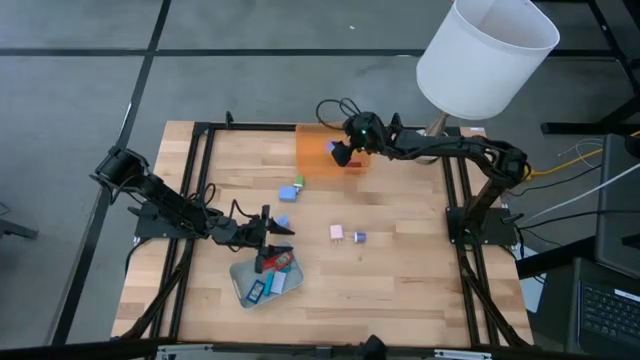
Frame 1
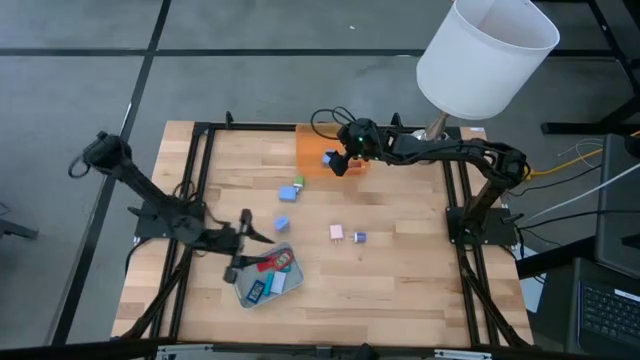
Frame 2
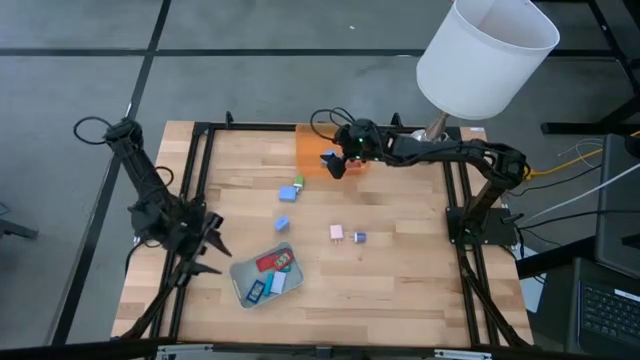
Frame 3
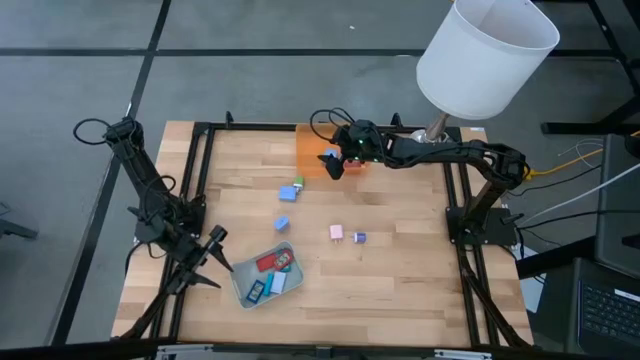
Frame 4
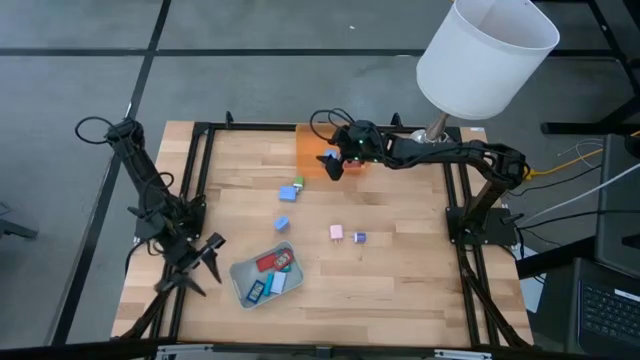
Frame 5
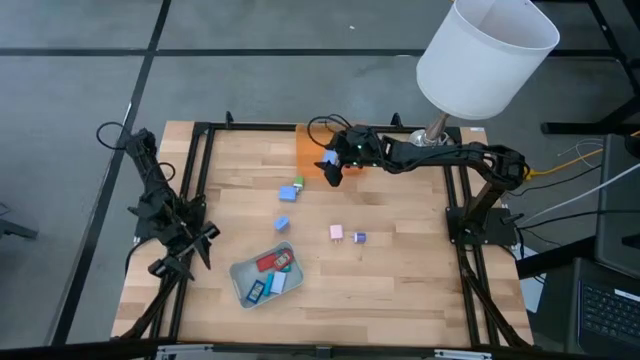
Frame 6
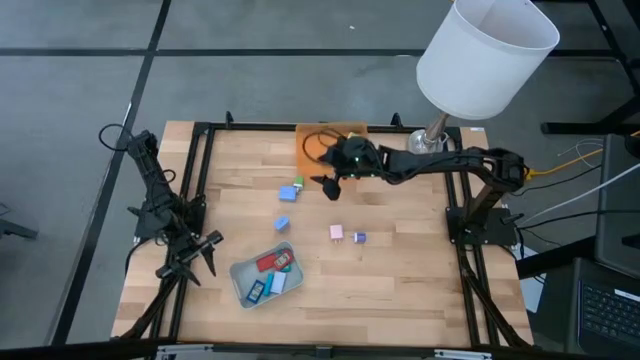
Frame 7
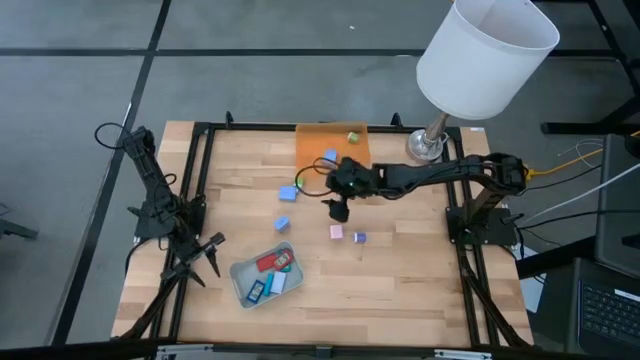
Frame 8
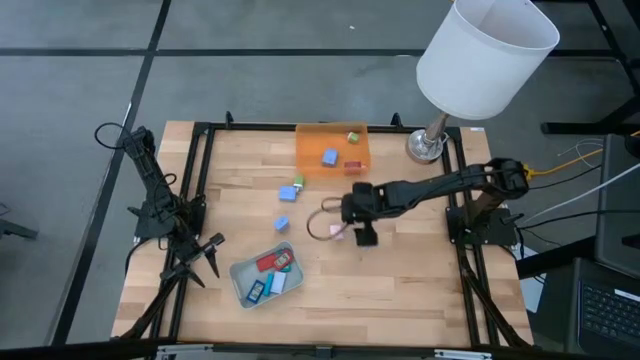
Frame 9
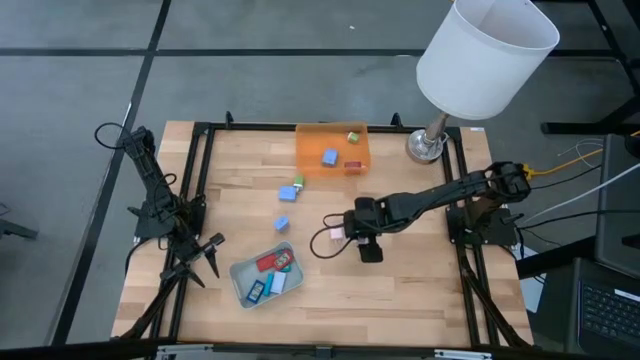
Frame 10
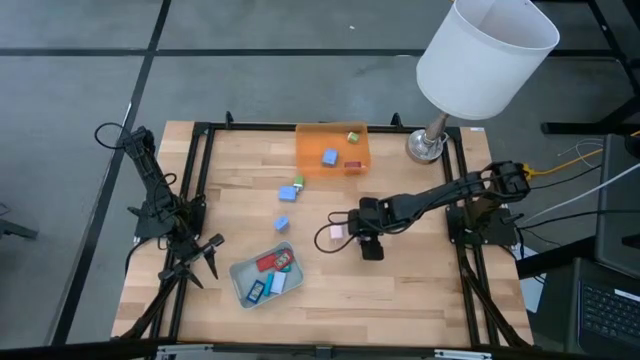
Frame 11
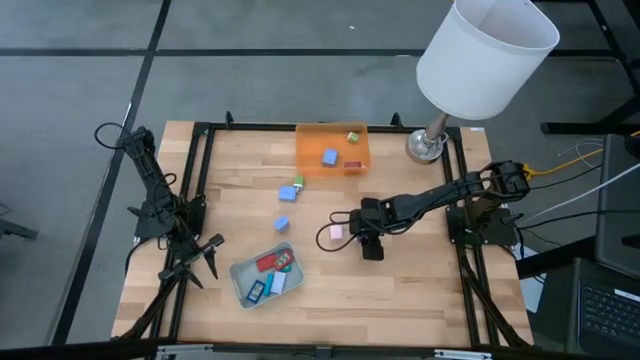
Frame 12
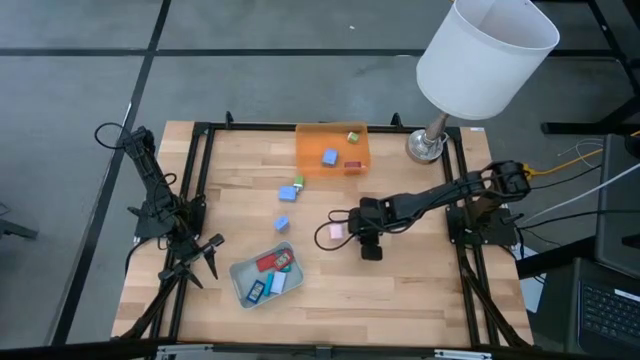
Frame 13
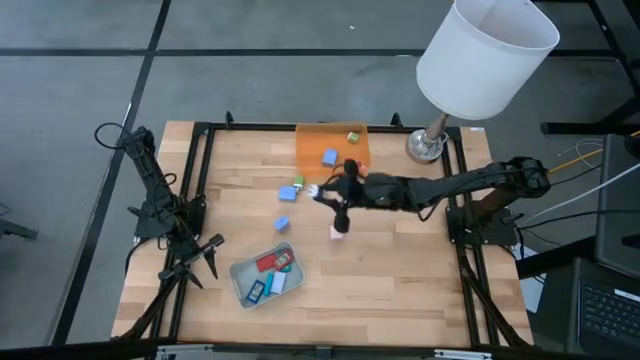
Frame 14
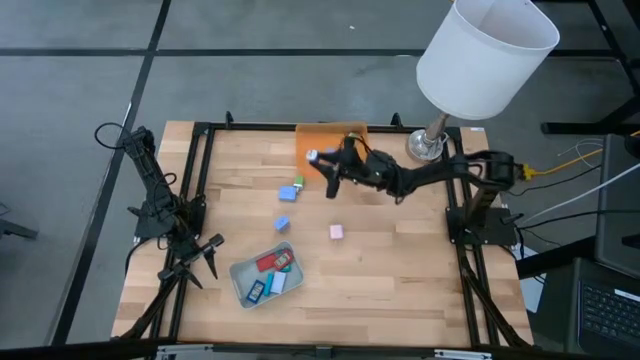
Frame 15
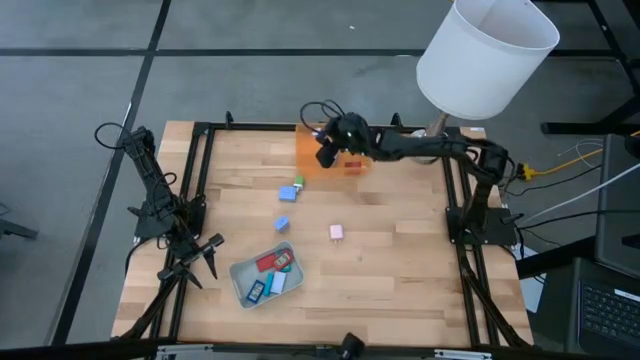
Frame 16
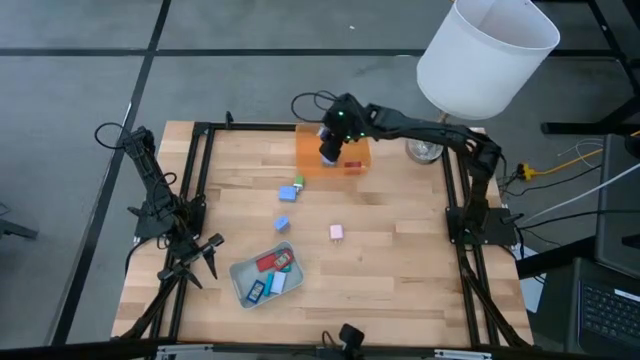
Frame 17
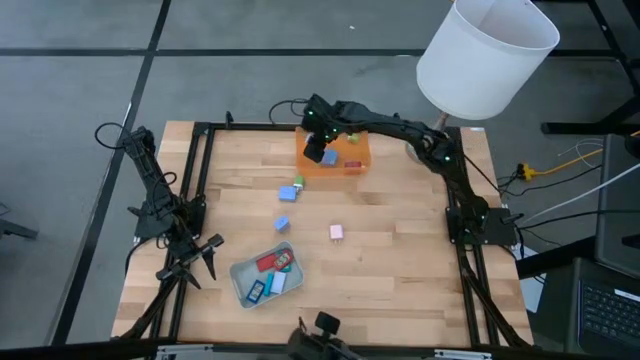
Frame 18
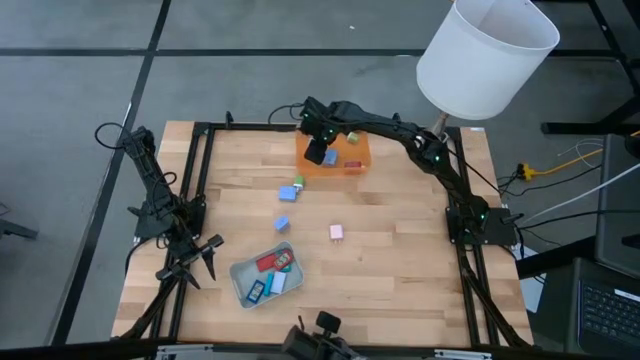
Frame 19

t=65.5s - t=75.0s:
Task: Pick & Place Office items
Put the purple charger adapter into the orange bin

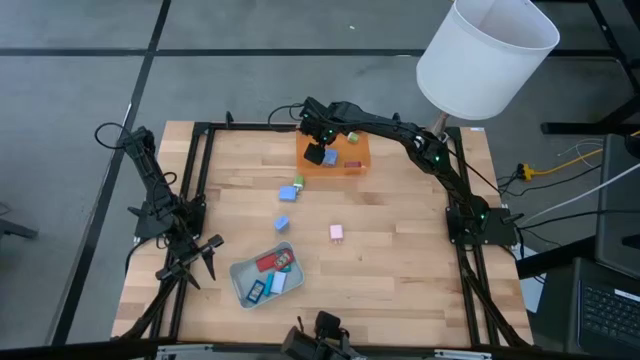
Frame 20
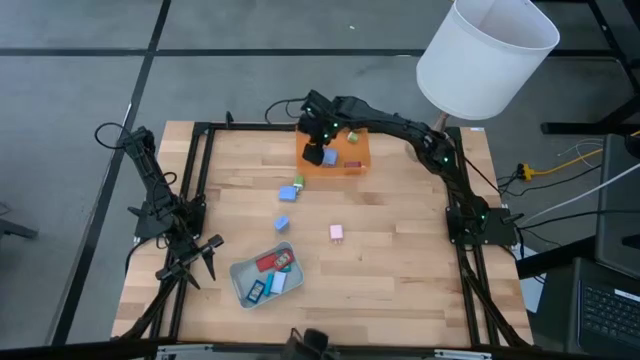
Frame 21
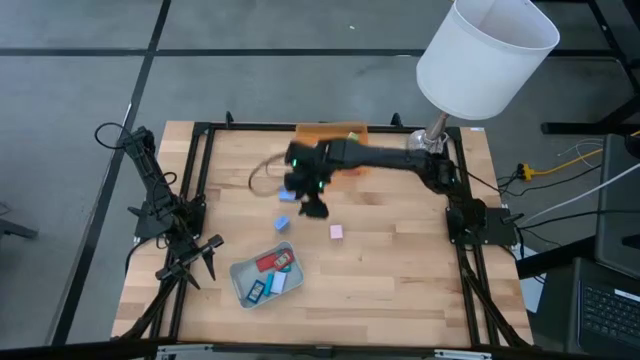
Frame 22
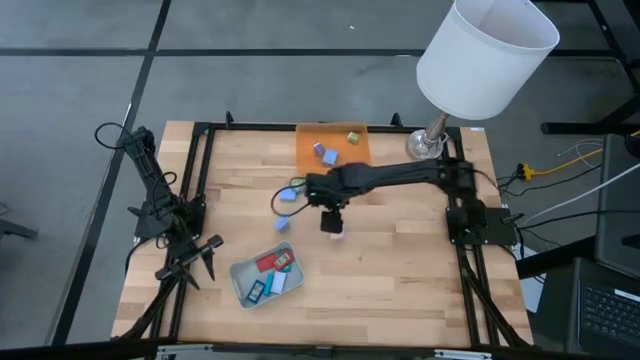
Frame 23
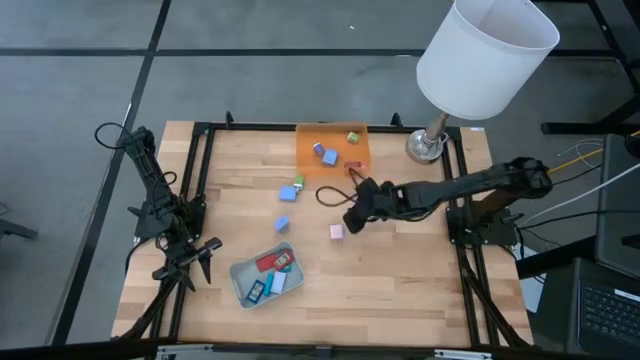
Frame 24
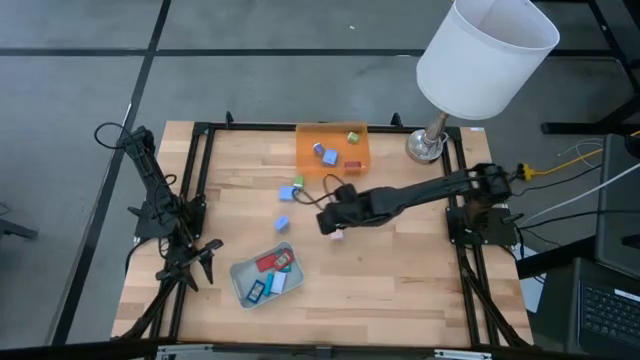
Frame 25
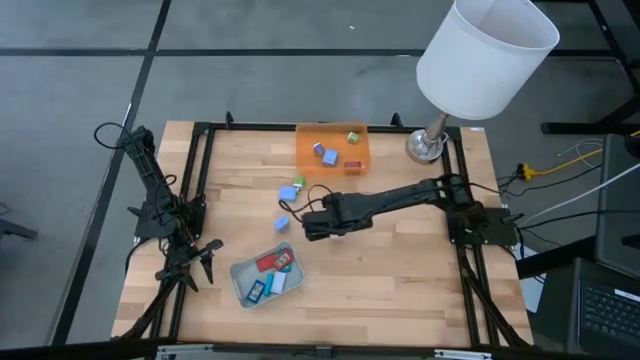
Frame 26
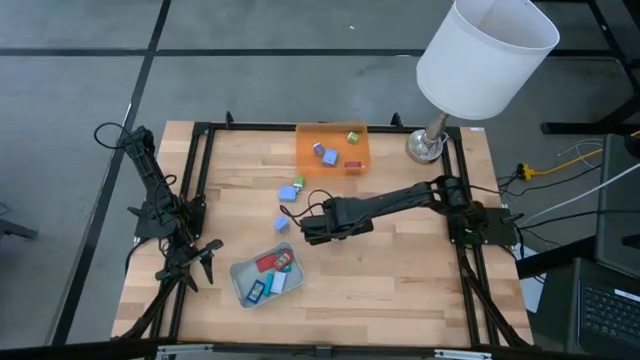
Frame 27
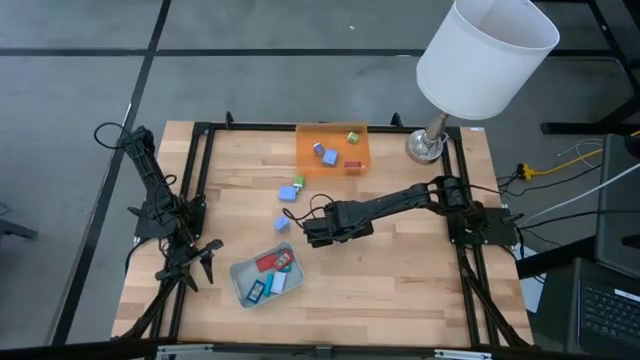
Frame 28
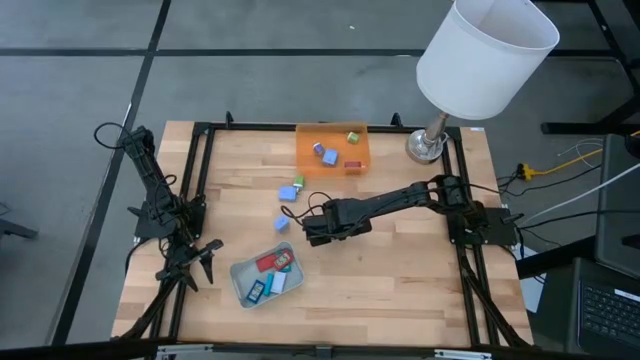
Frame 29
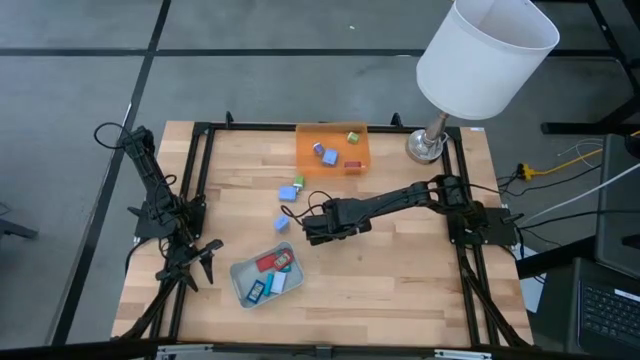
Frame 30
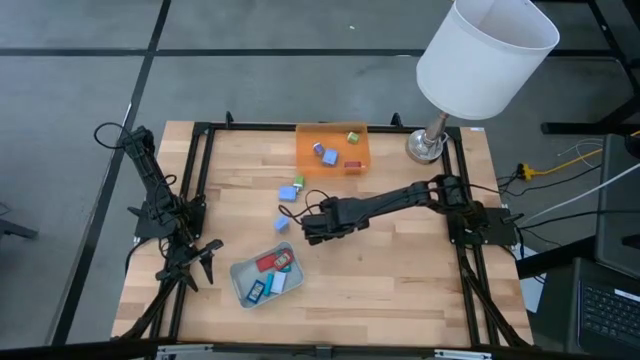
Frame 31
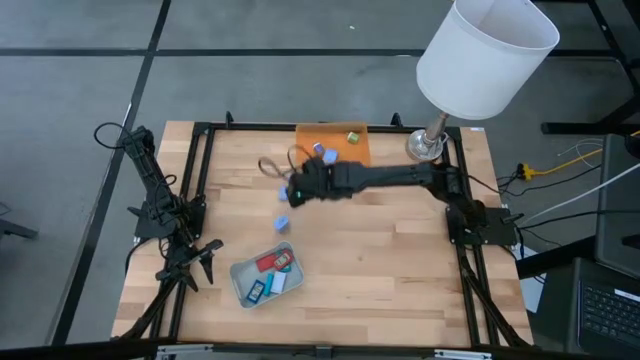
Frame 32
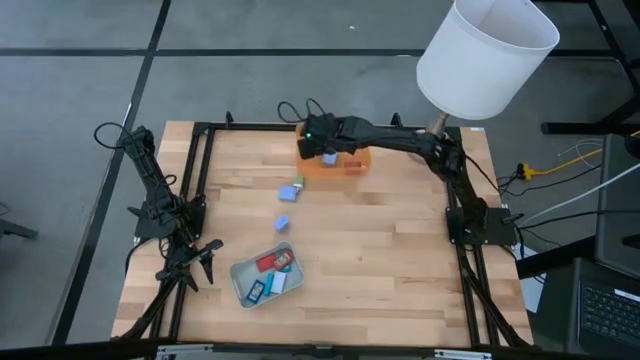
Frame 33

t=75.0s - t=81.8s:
Put the pink charger adapter into the orange bin

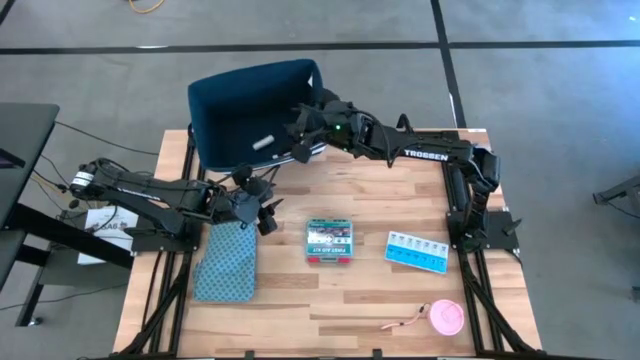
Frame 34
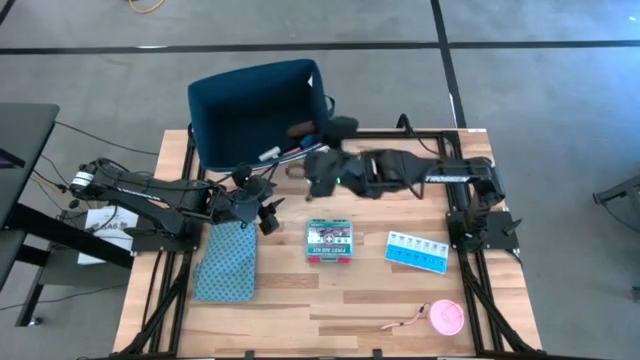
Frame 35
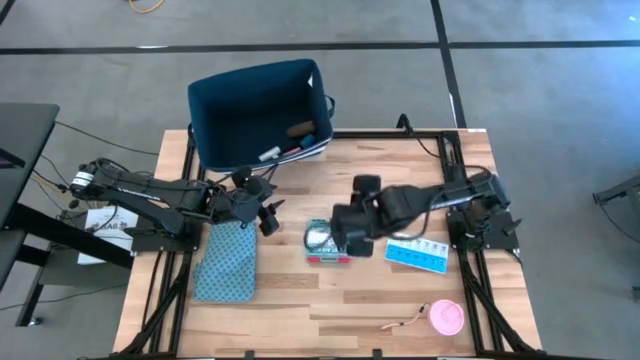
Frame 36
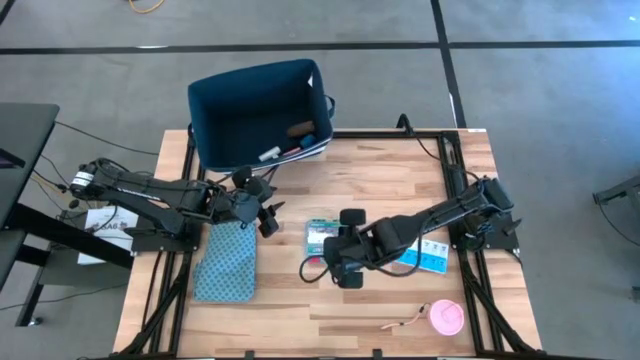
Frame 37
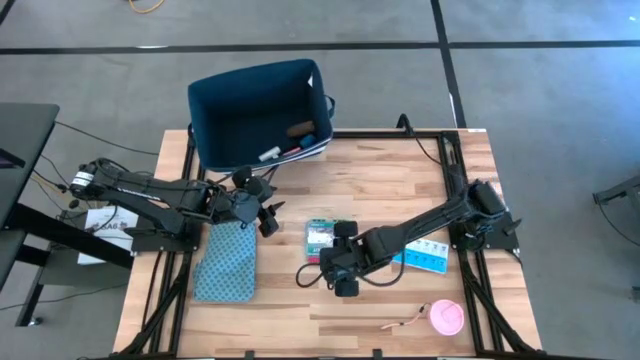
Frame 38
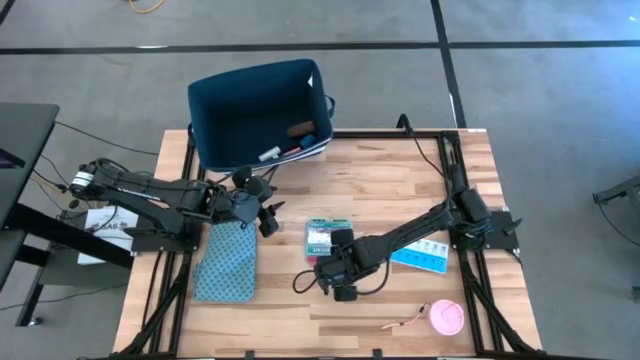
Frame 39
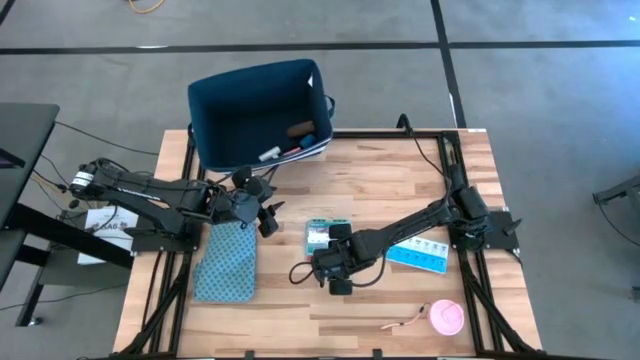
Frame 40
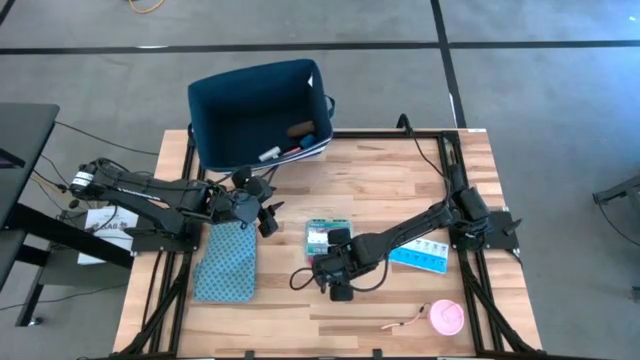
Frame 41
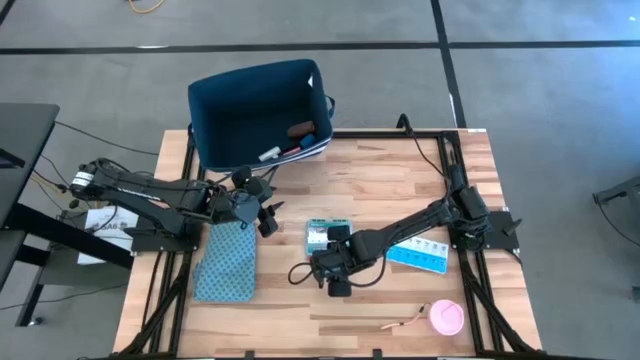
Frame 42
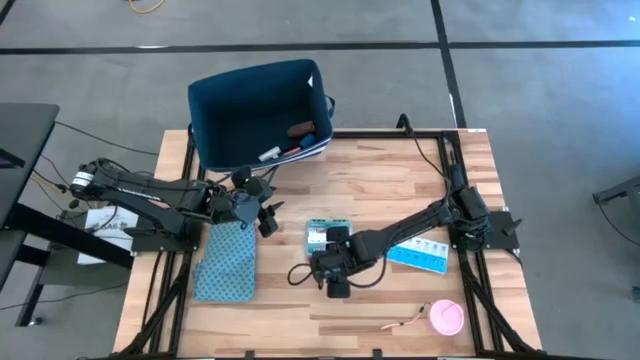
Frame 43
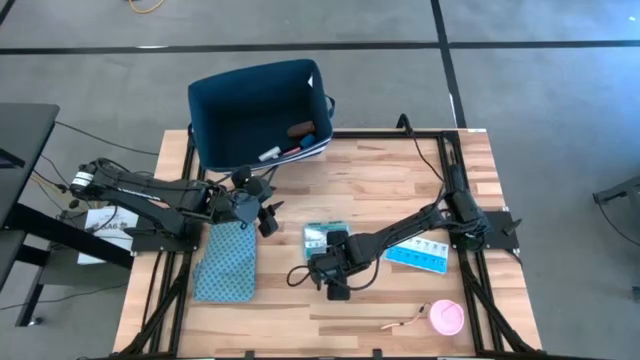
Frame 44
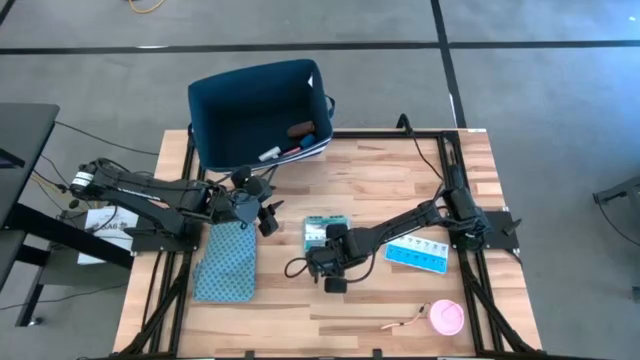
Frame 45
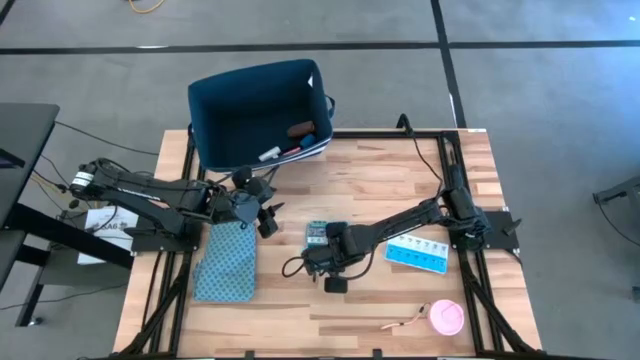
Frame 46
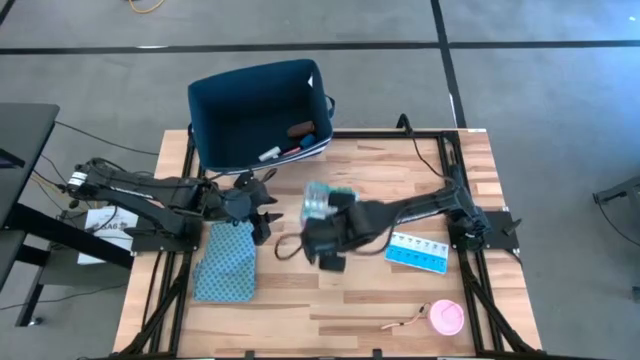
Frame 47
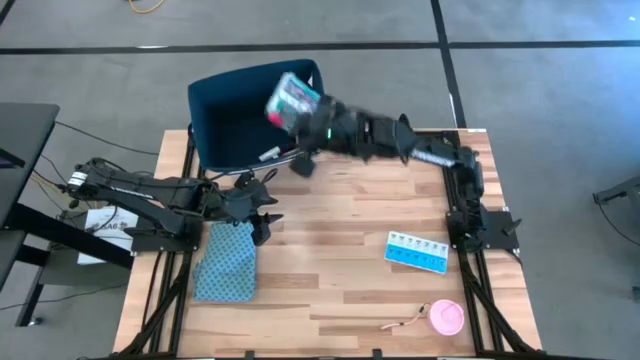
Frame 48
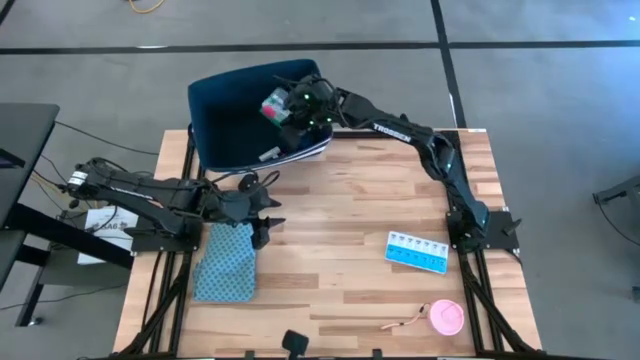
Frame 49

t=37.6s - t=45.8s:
Task: Pick & place medical supplies in basket/bin
Put the first aid kit into the blue bin
